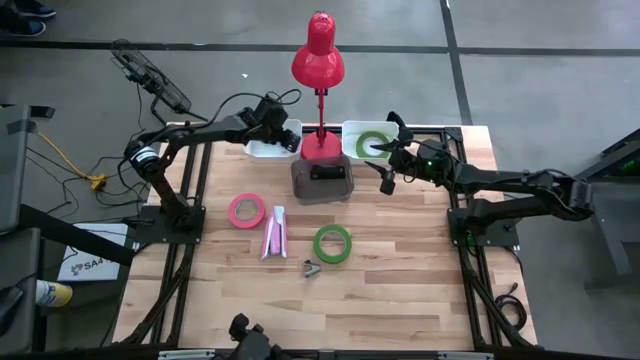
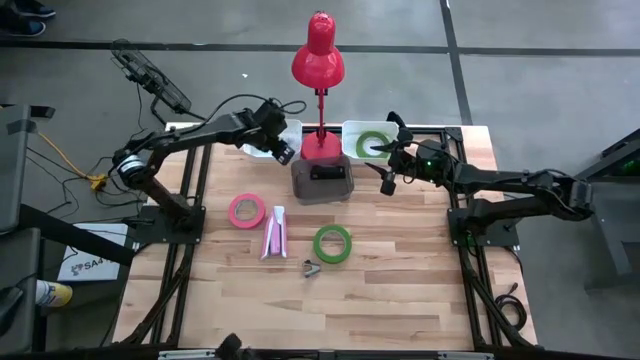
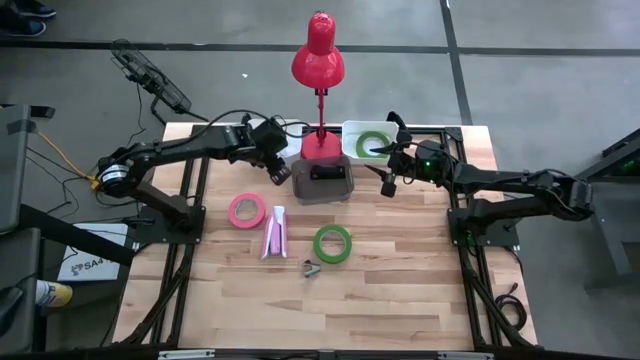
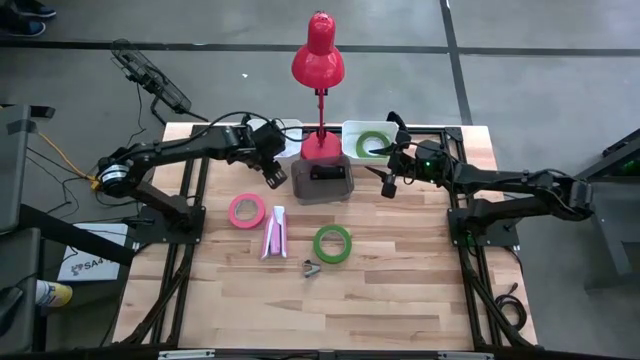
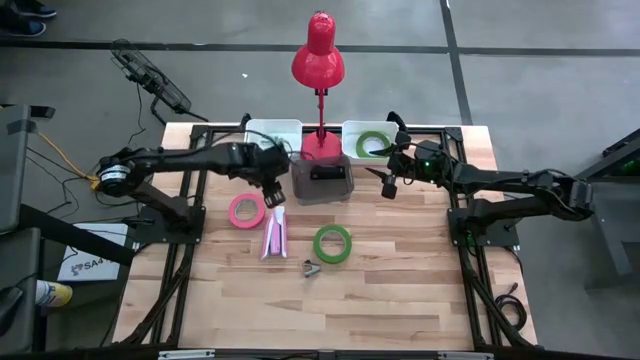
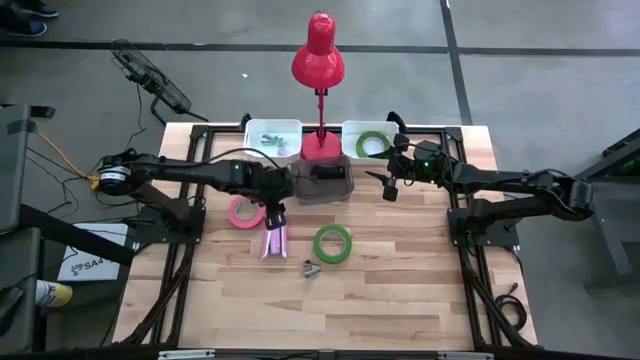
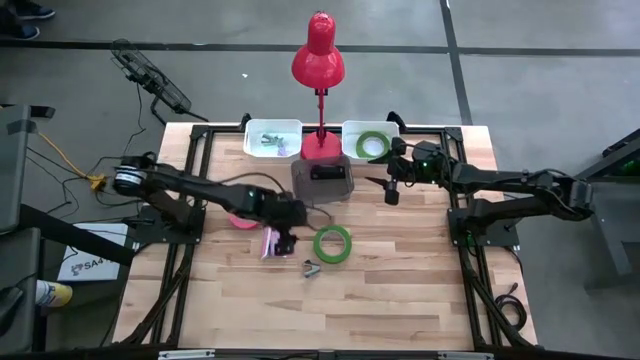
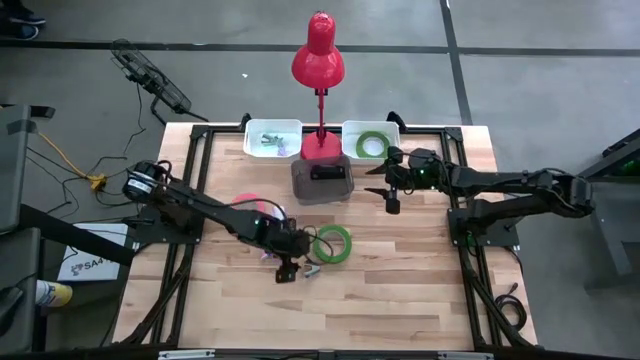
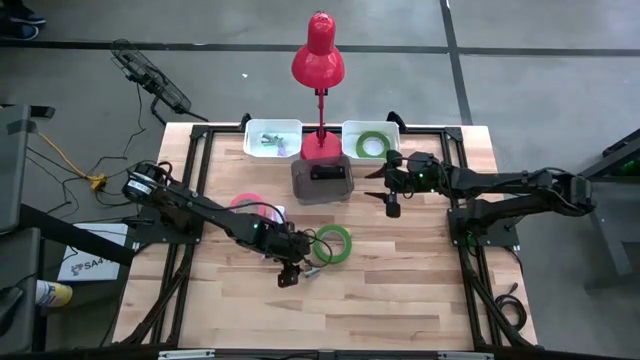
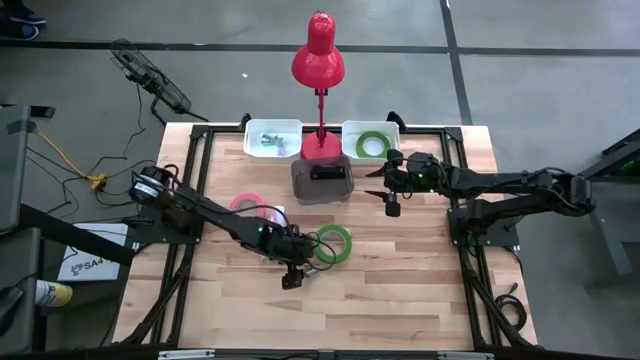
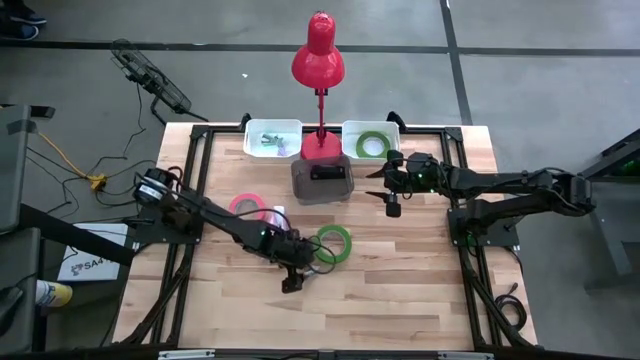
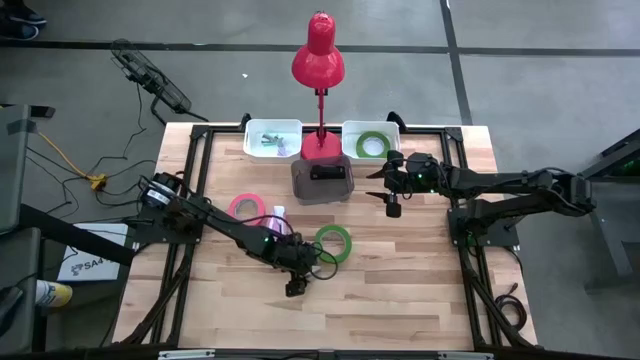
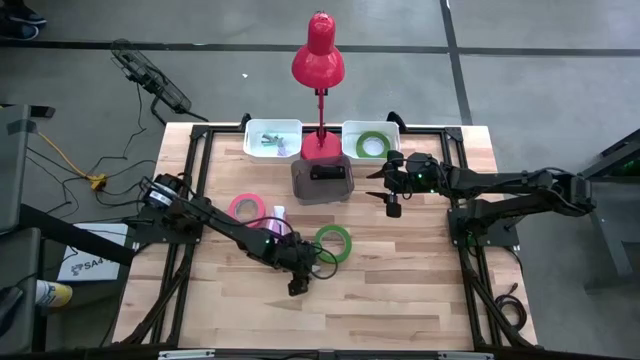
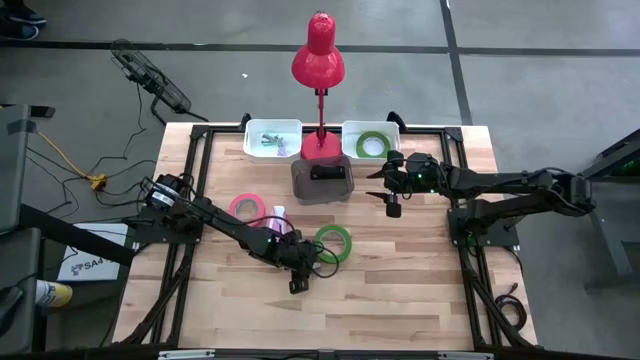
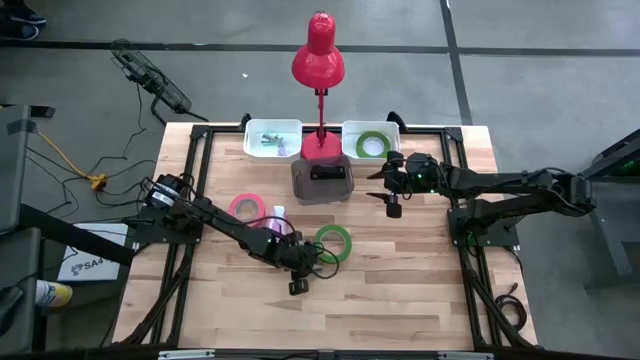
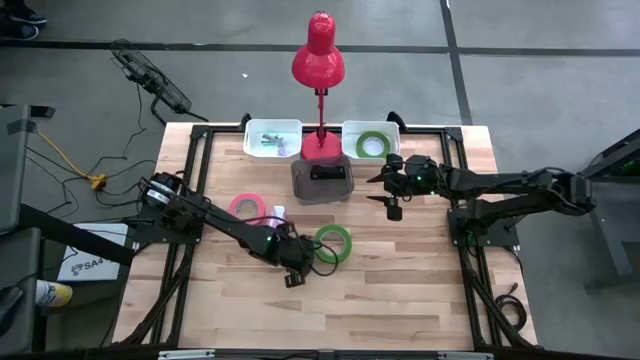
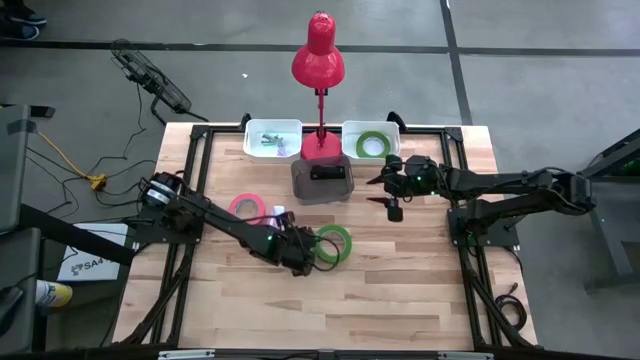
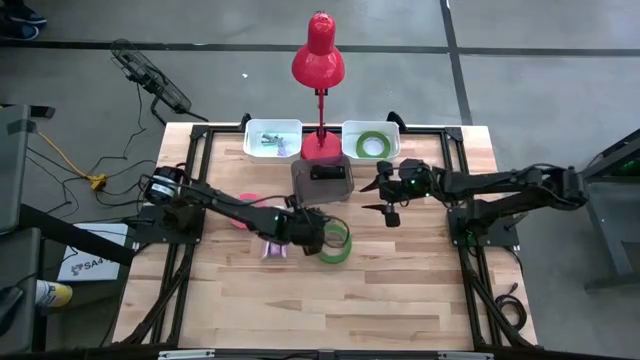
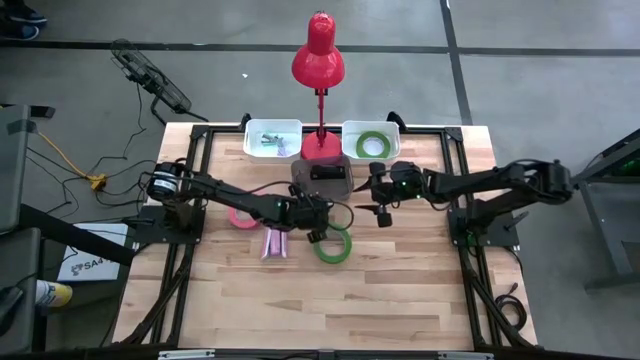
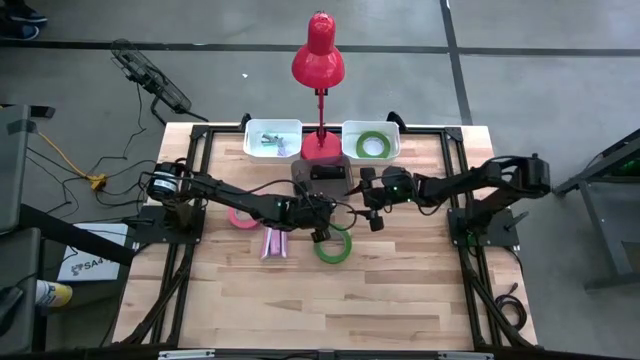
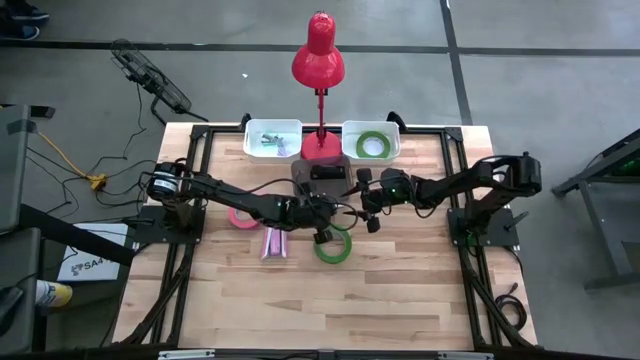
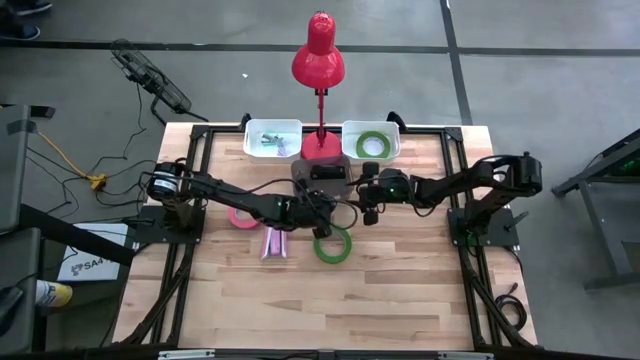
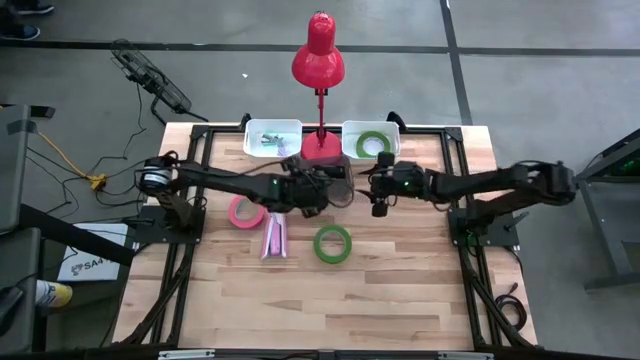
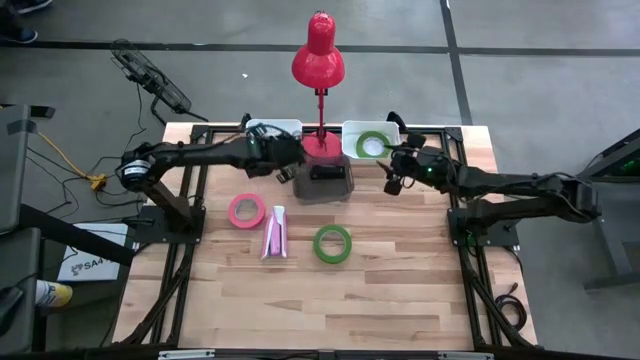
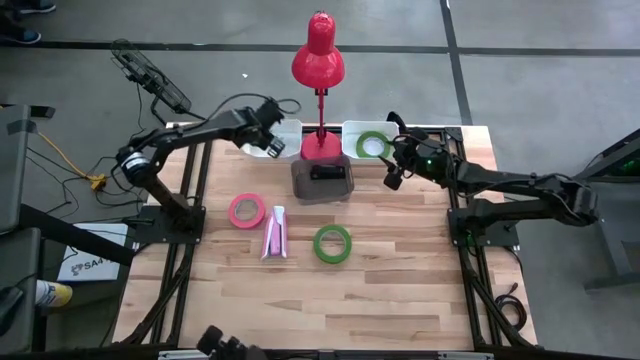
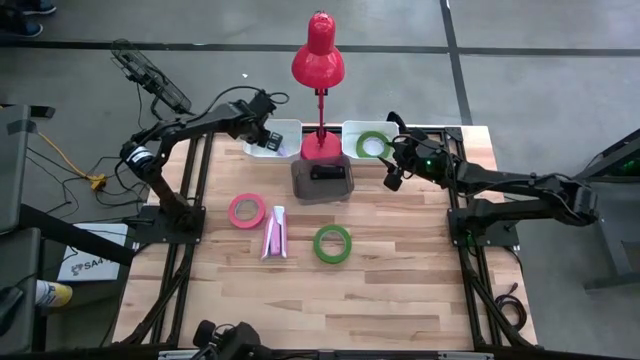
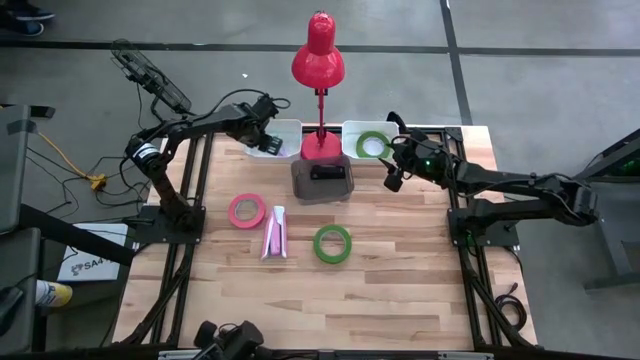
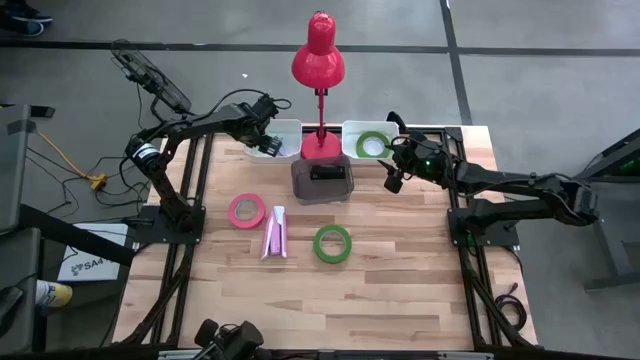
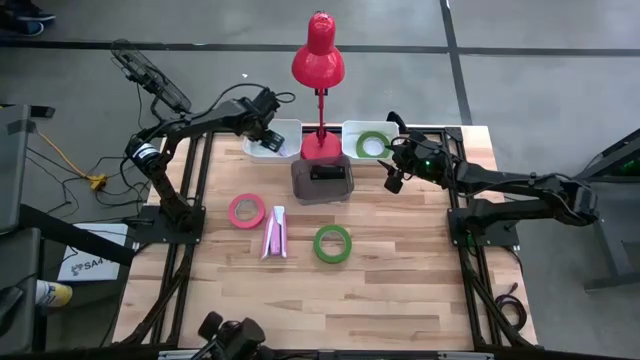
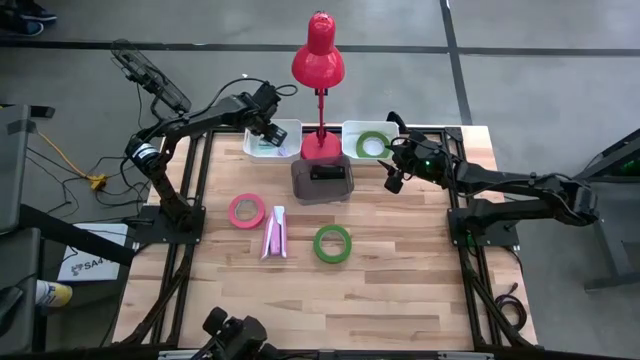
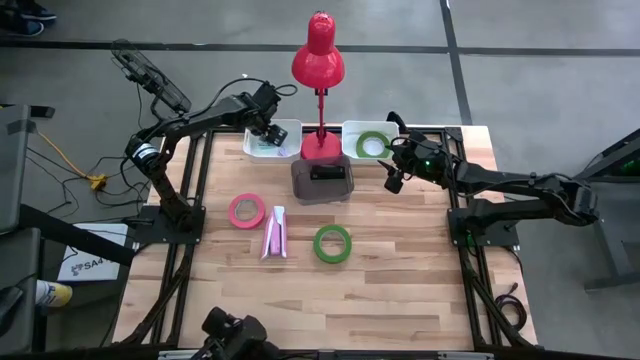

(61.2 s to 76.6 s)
Task: Pick and place Stapler, Stapler remover, tape
Put the black staple remover into the left white bin

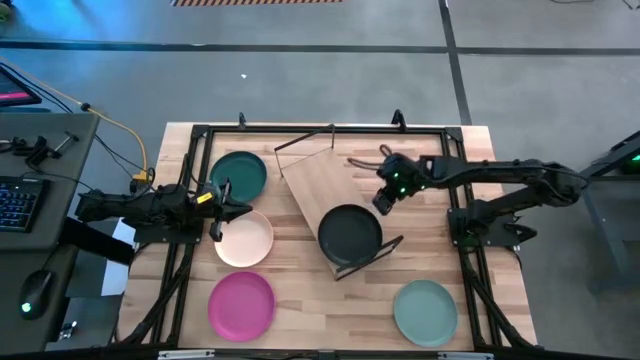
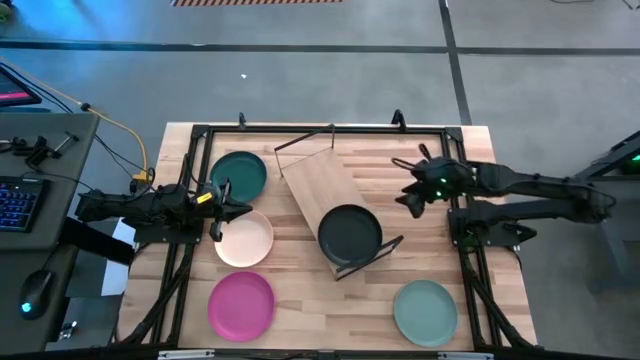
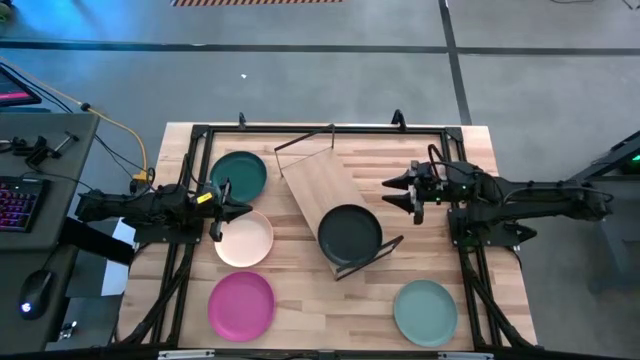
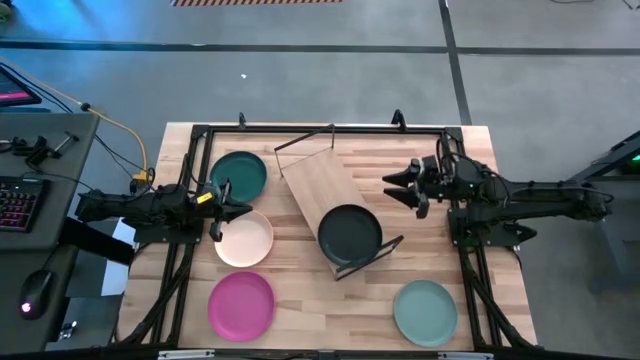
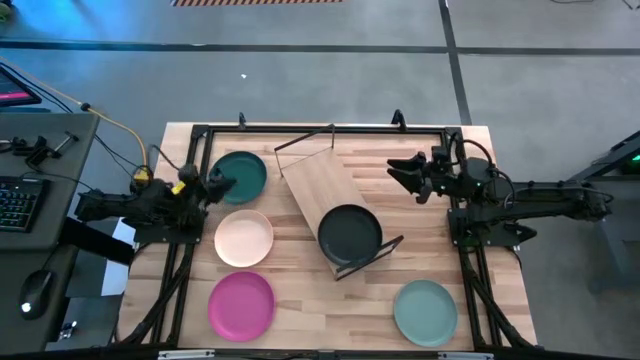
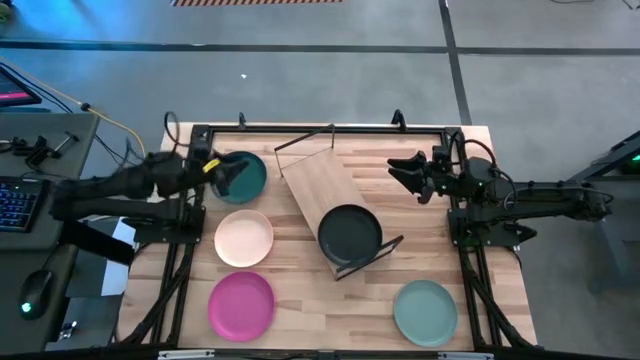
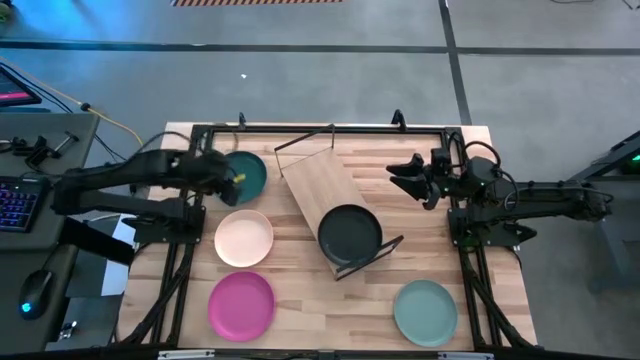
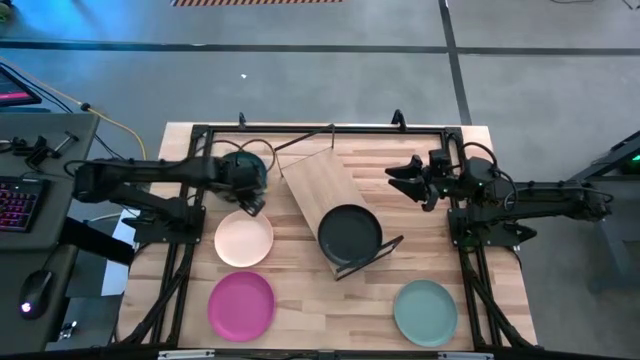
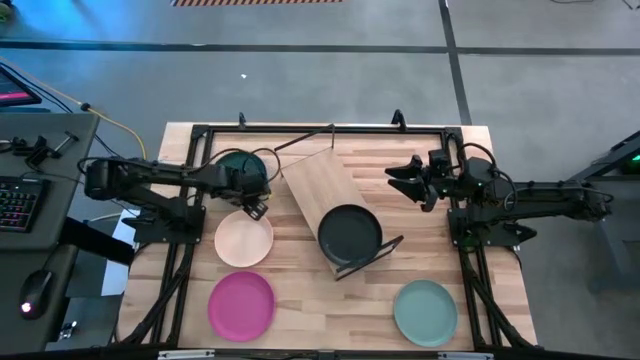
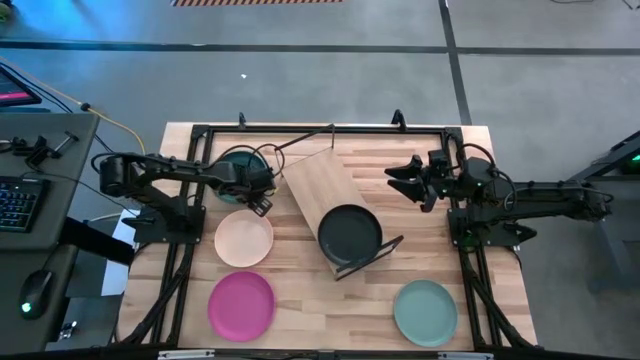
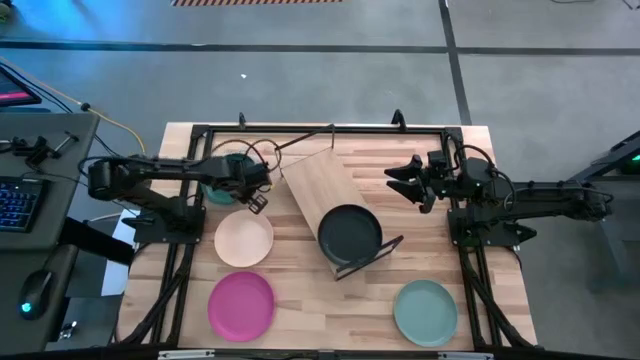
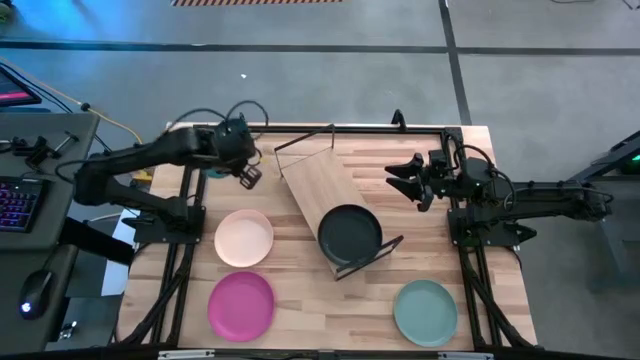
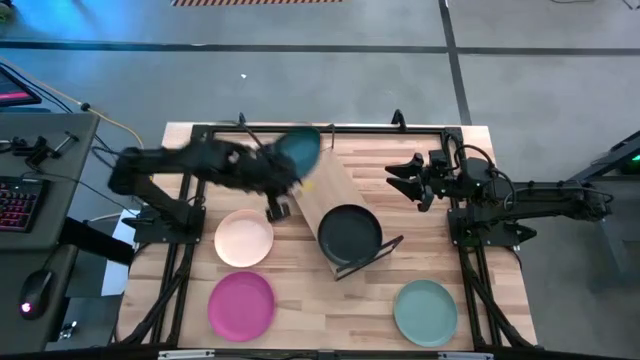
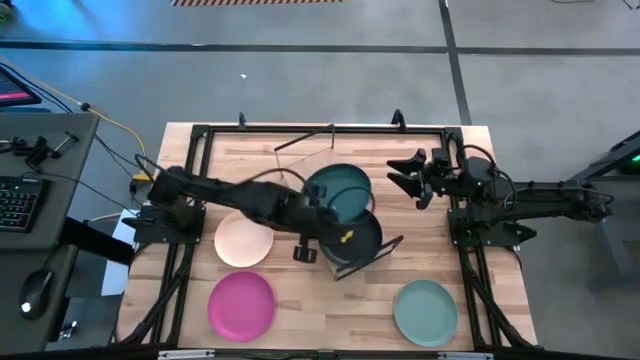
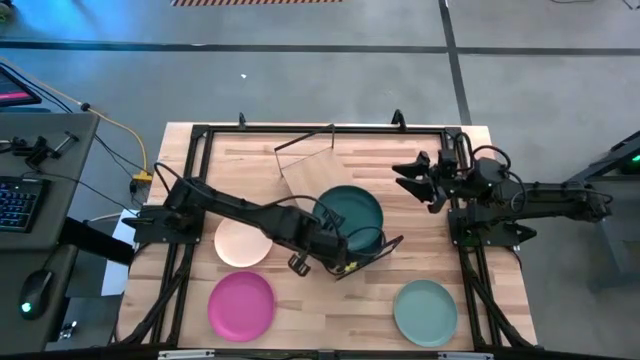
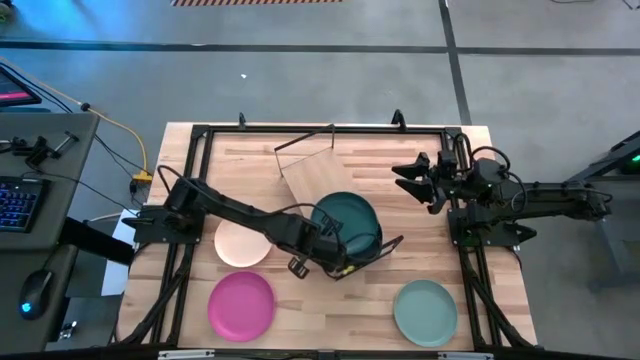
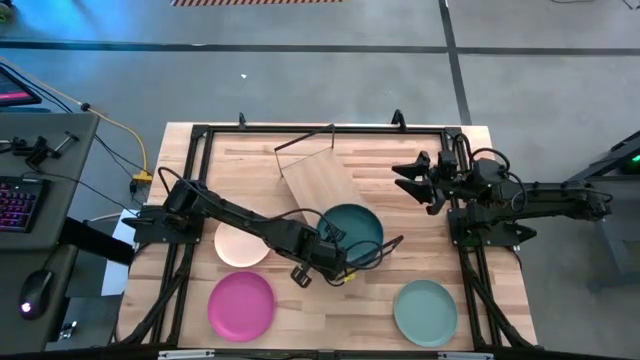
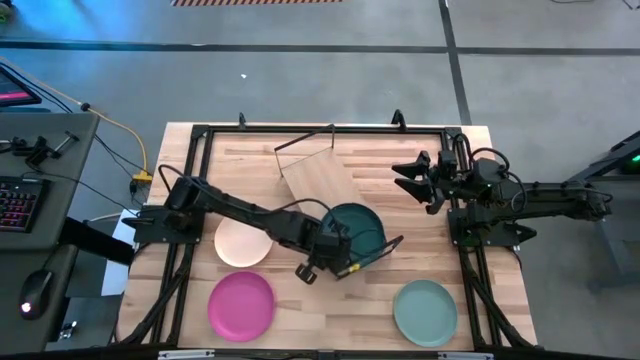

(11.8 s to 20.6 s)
Task: Place and stack plates onto a shelf
Stack the dark green plate on top of the black plate on the shelf
